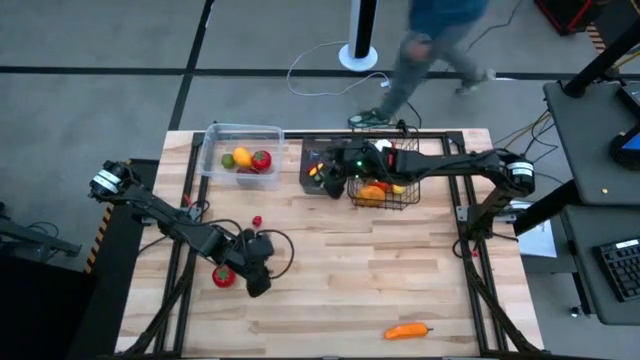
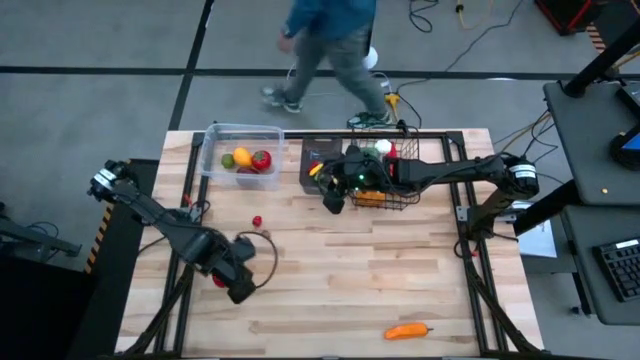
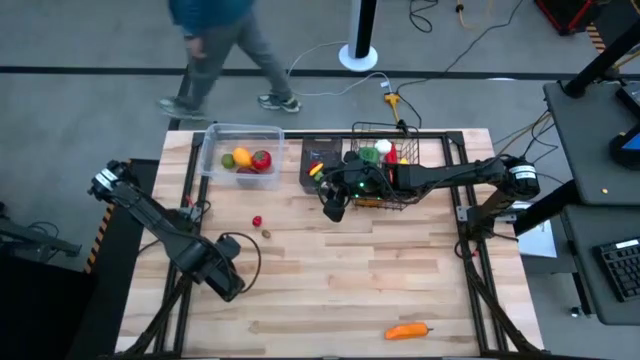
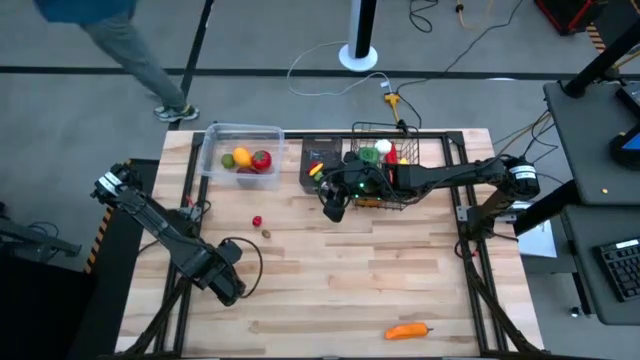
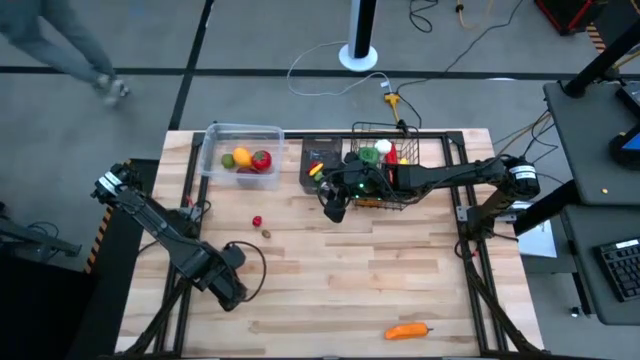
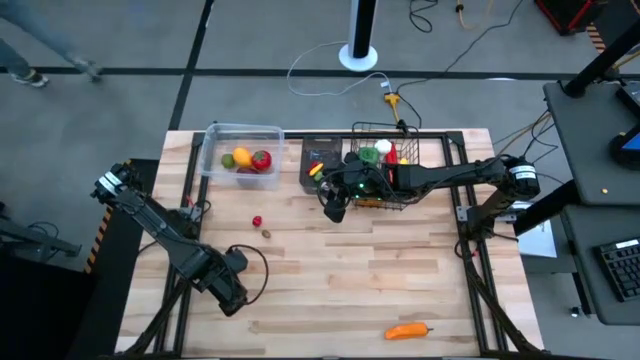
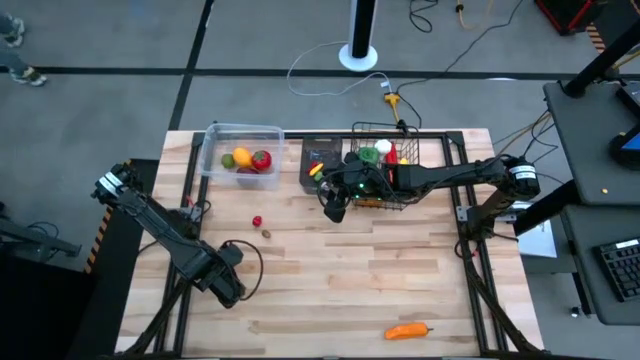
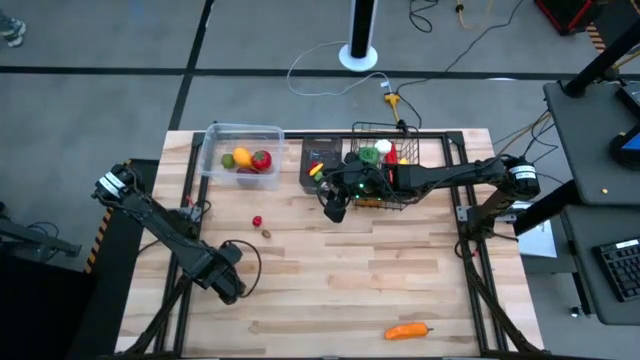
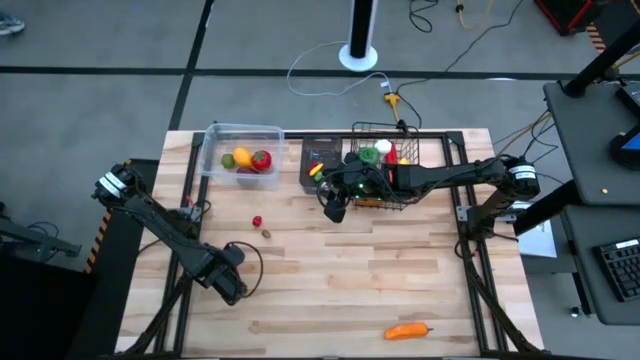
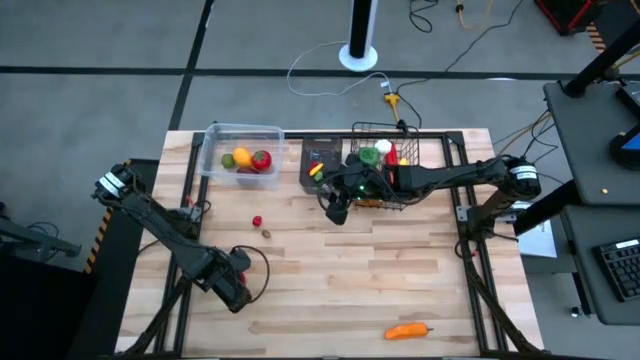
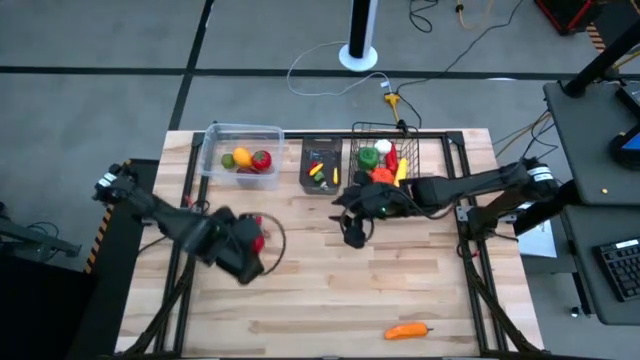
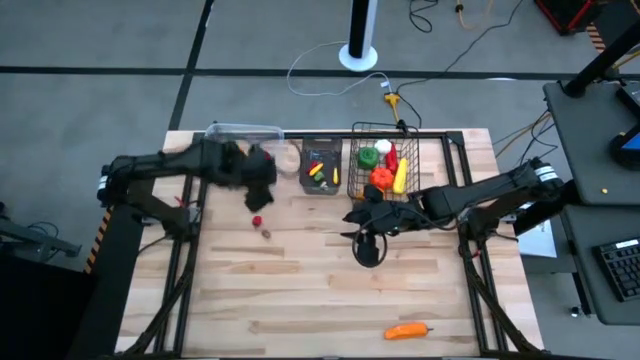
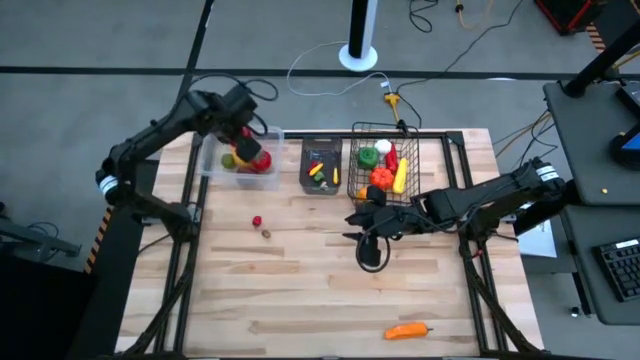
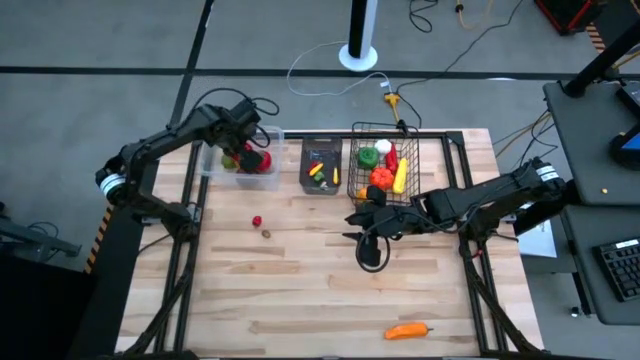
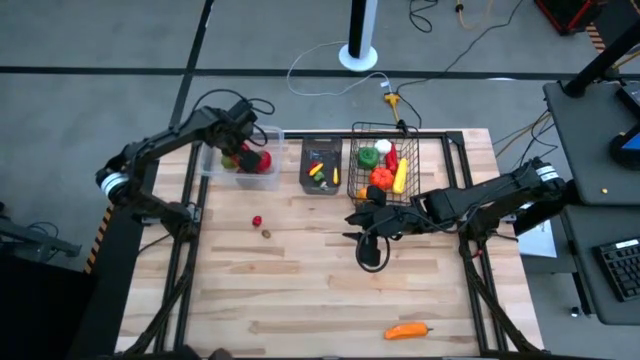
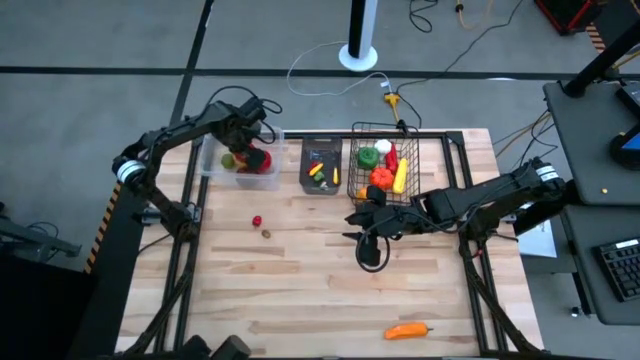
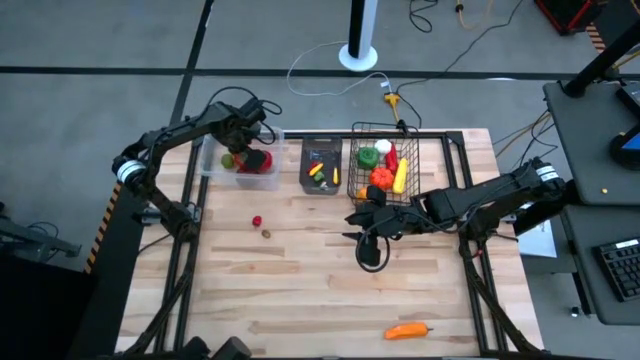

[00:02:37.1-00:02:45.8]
Task: Sort produce into baskets
Put the red tomato into the transparent bin

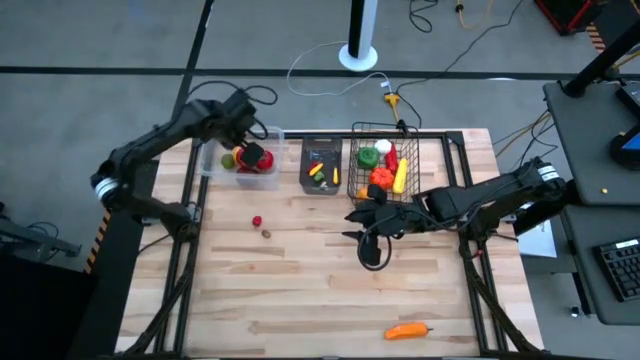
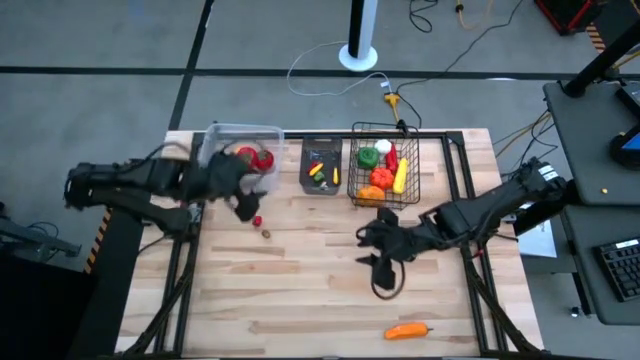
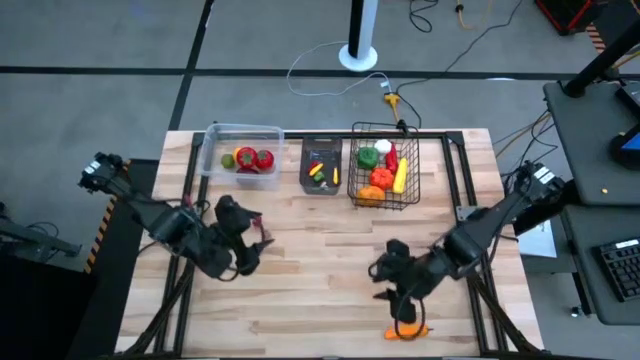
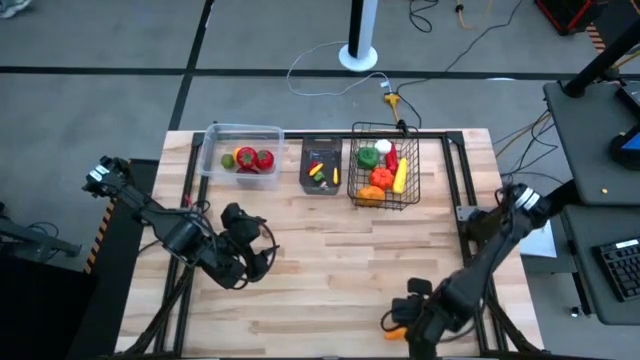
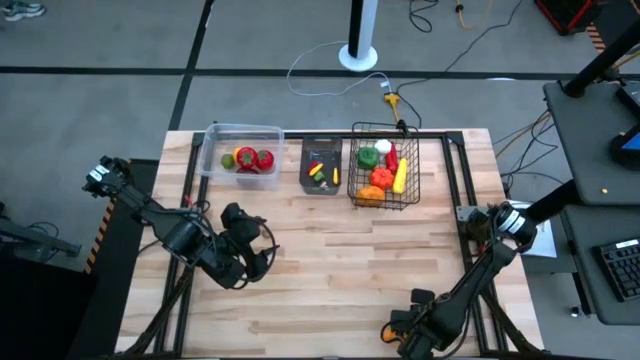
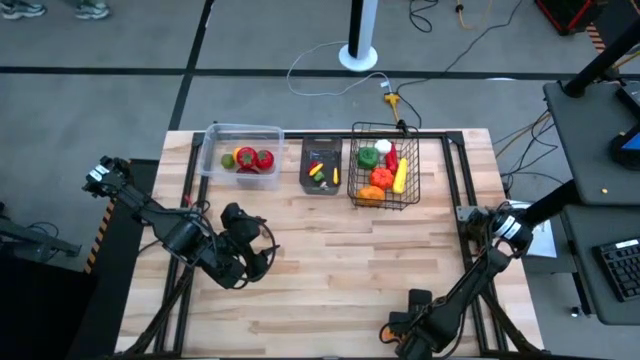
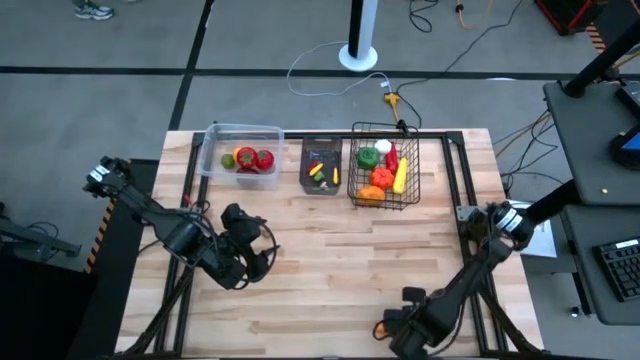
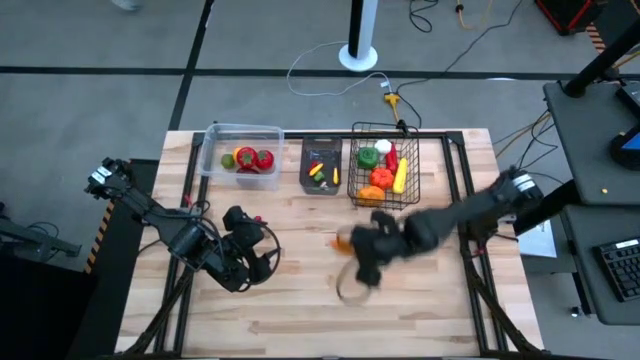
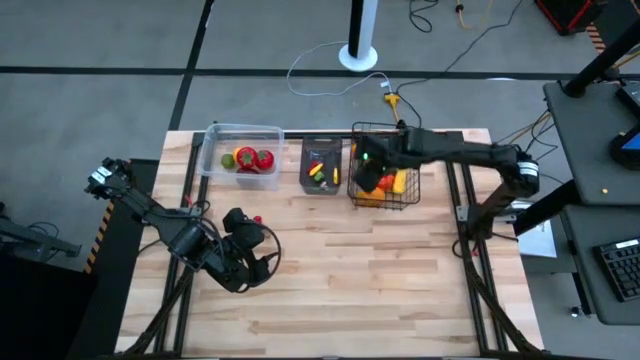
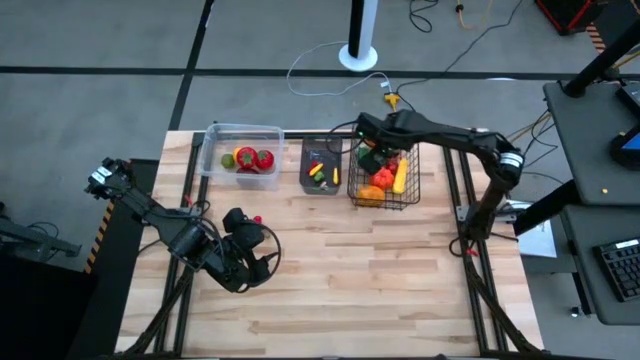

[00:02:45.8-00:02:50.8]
Put the brown chili pepper into the wire basket

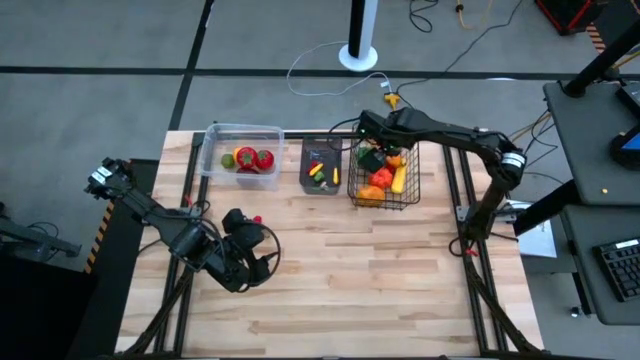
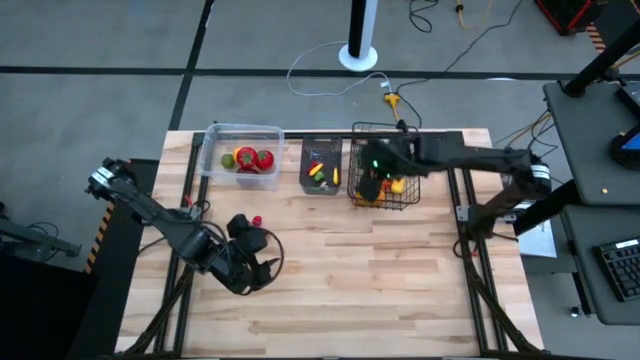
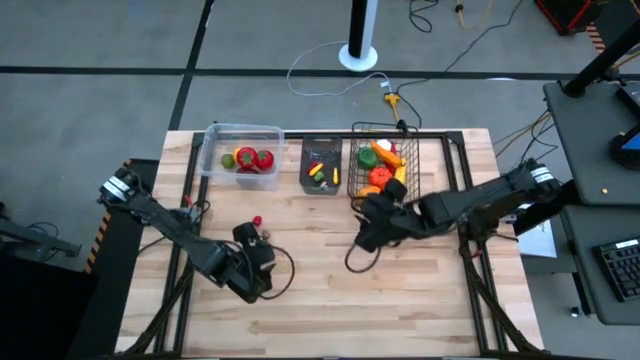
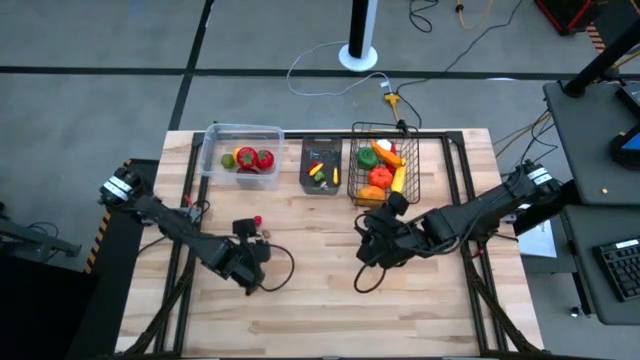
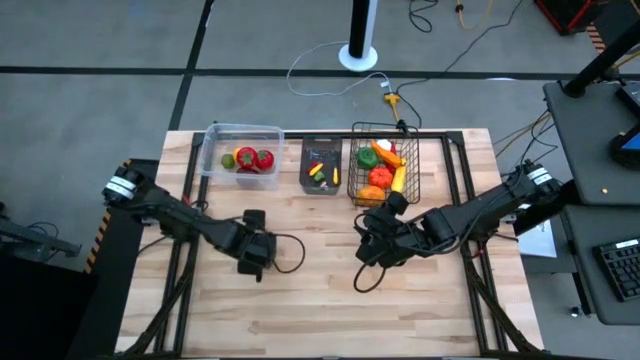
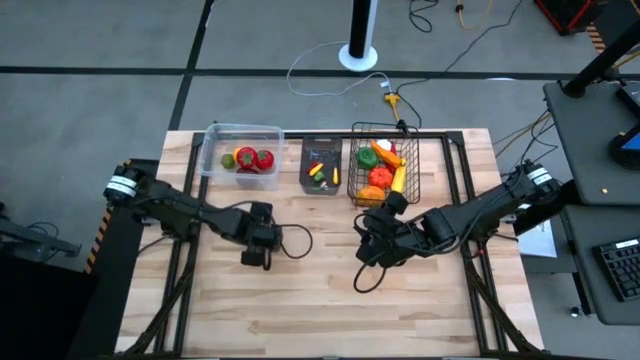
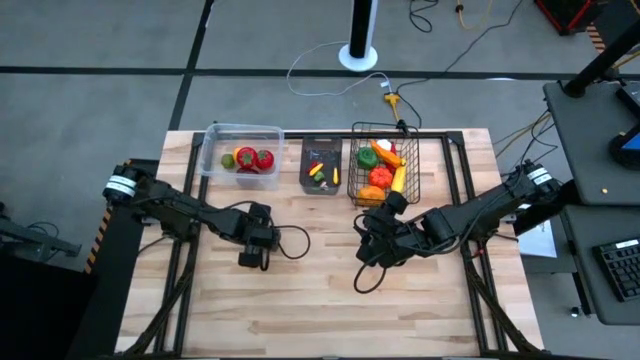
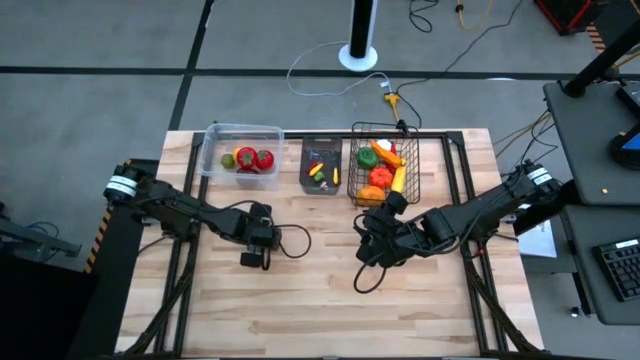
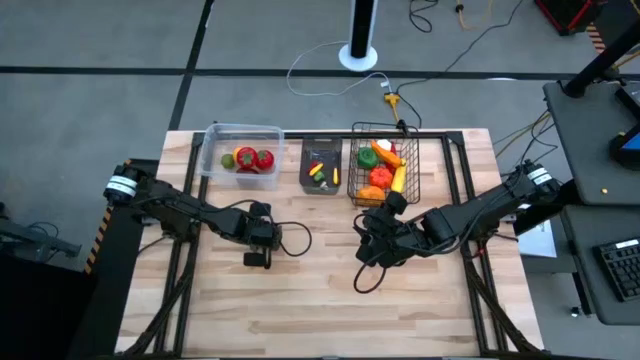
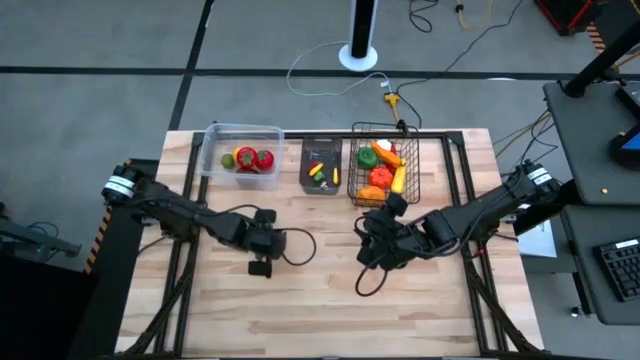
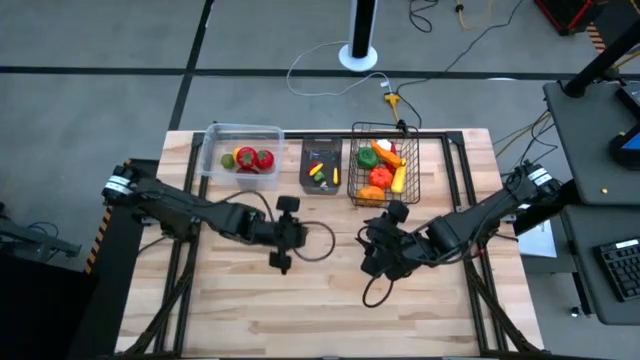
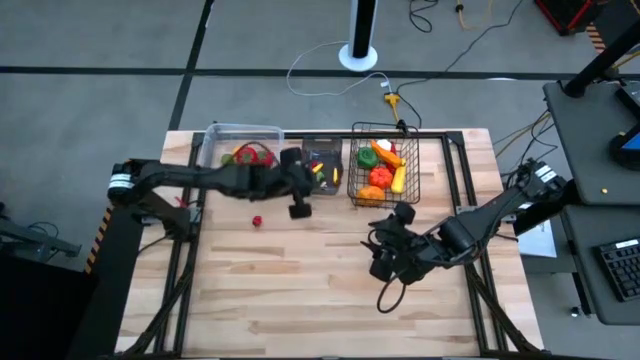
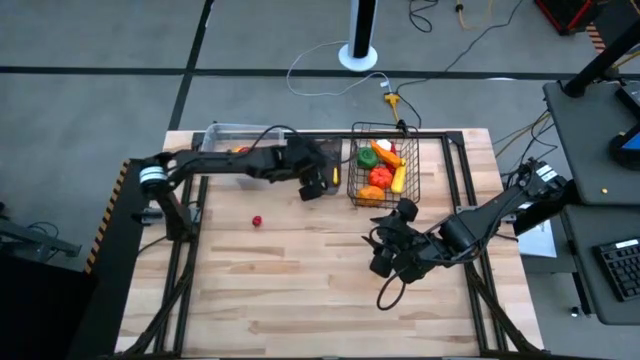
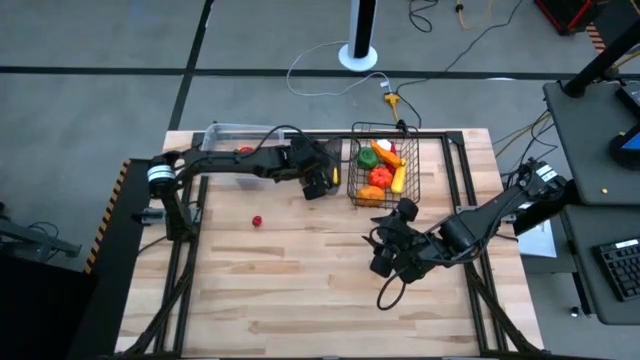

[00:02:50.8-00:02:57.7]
Put the brown potato into the black bin
